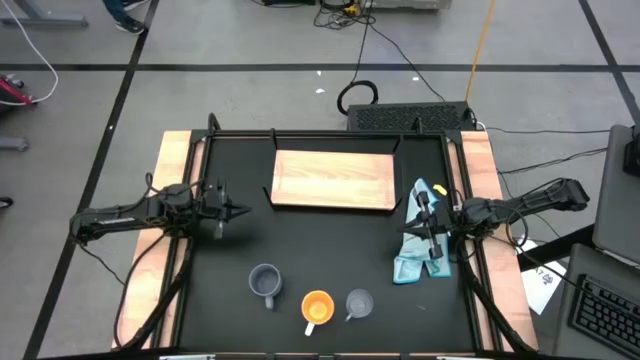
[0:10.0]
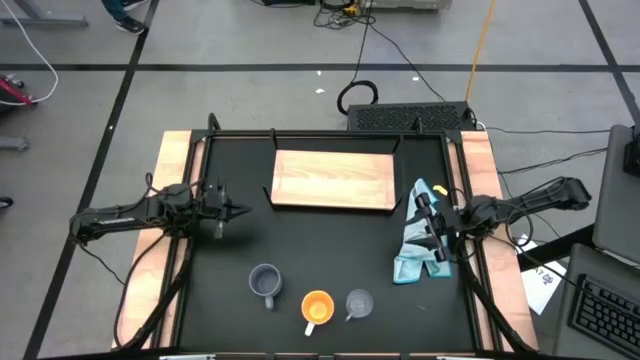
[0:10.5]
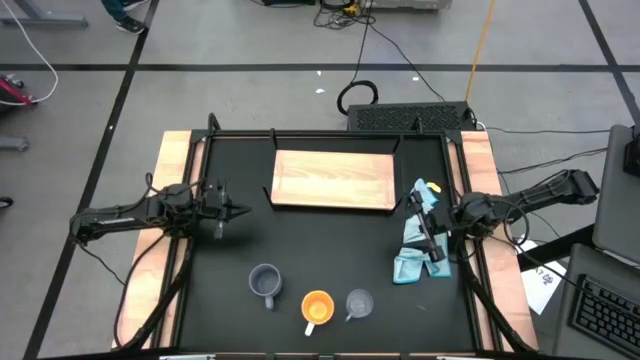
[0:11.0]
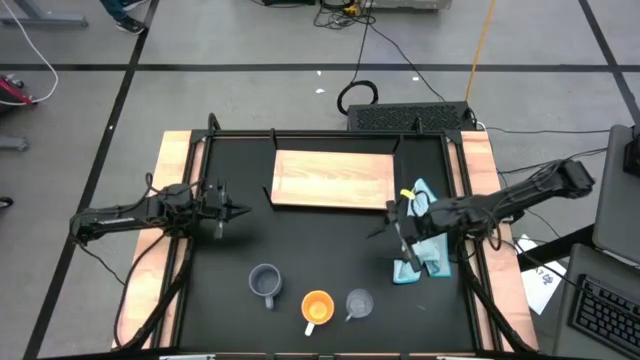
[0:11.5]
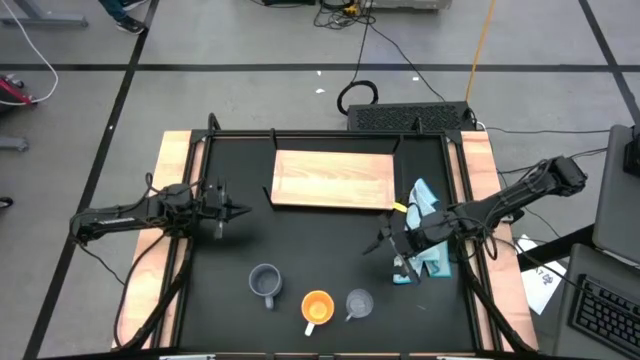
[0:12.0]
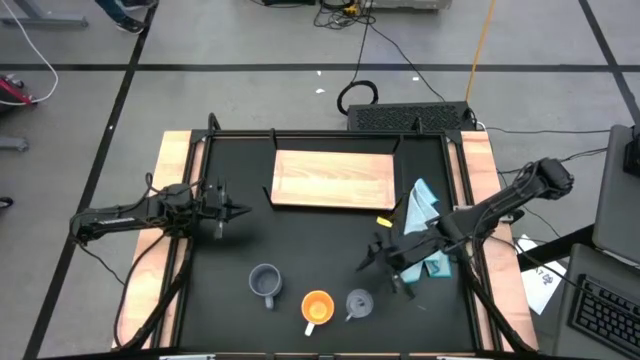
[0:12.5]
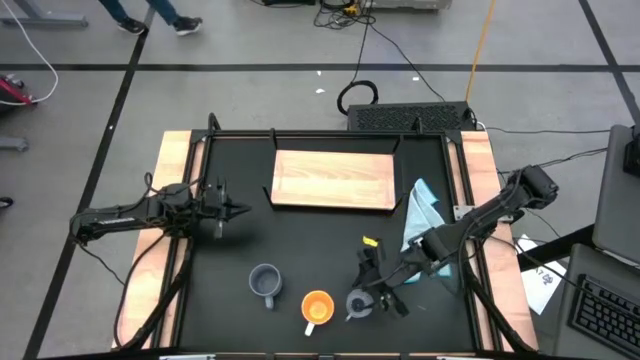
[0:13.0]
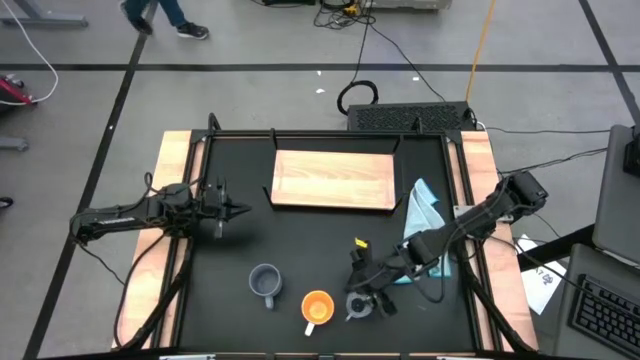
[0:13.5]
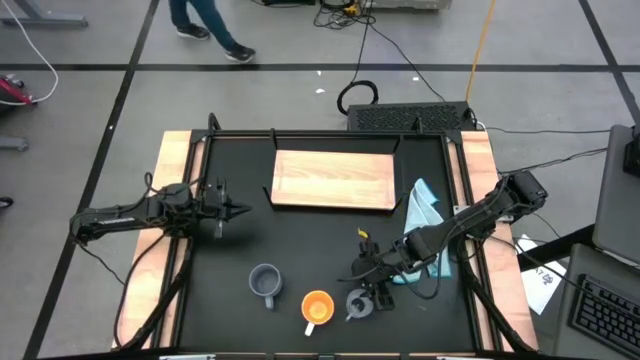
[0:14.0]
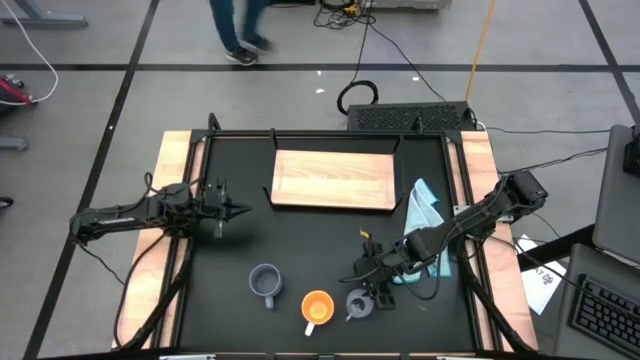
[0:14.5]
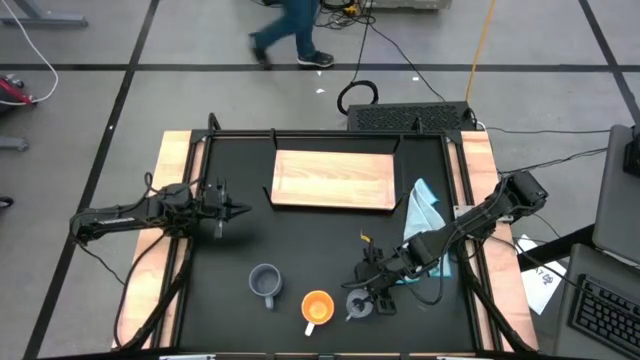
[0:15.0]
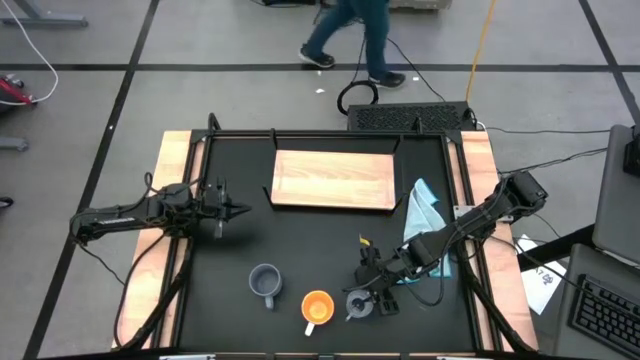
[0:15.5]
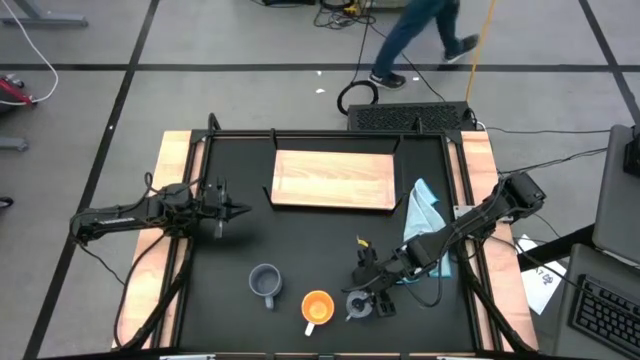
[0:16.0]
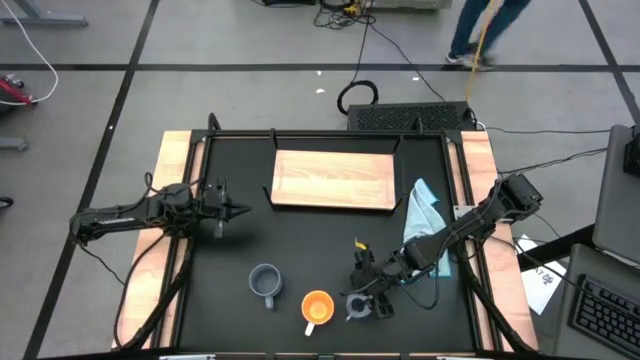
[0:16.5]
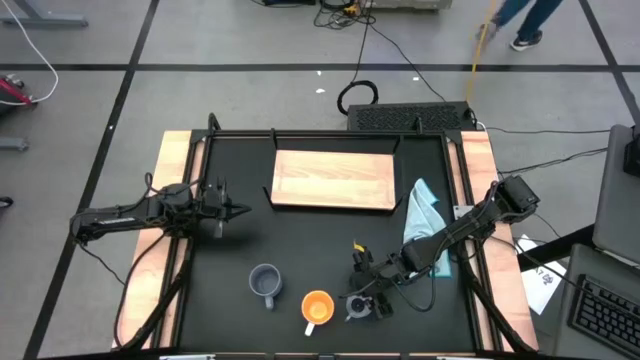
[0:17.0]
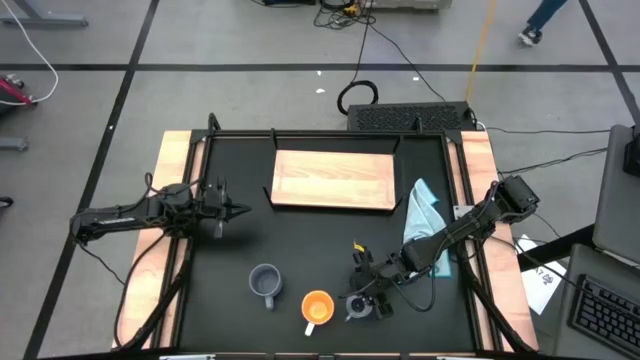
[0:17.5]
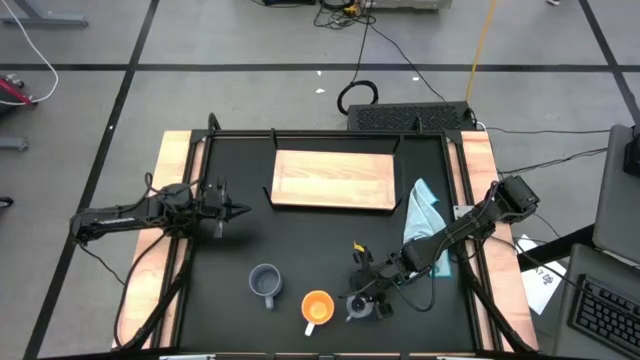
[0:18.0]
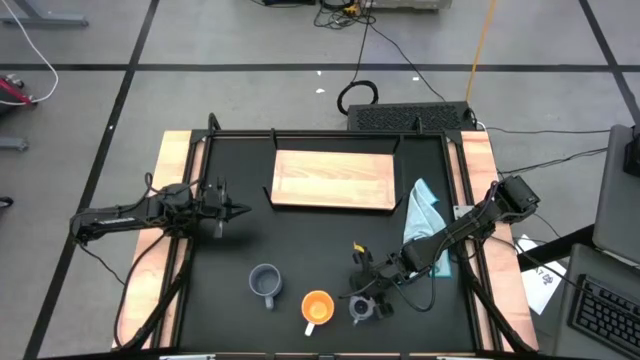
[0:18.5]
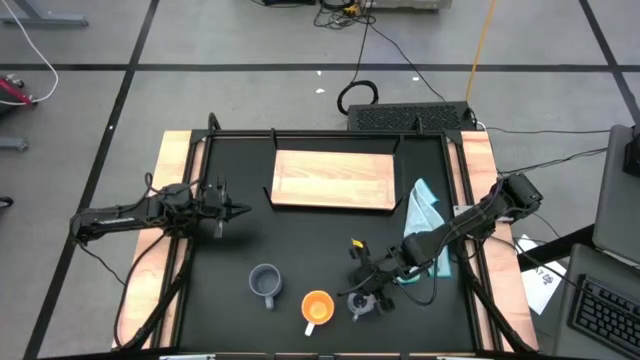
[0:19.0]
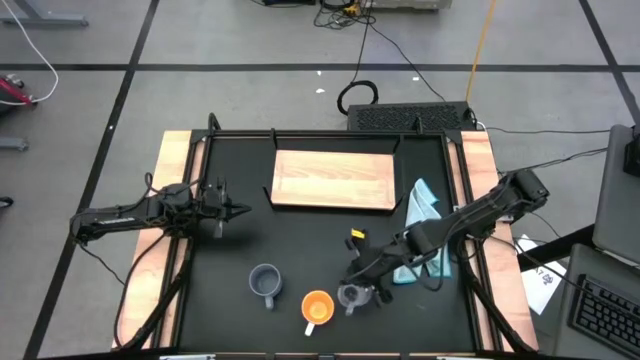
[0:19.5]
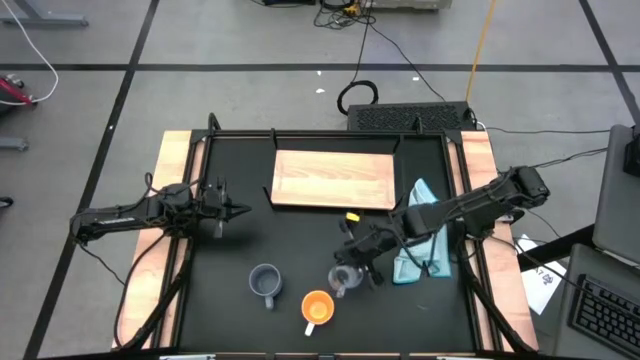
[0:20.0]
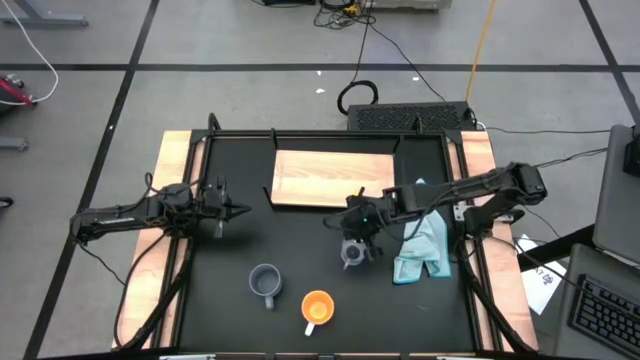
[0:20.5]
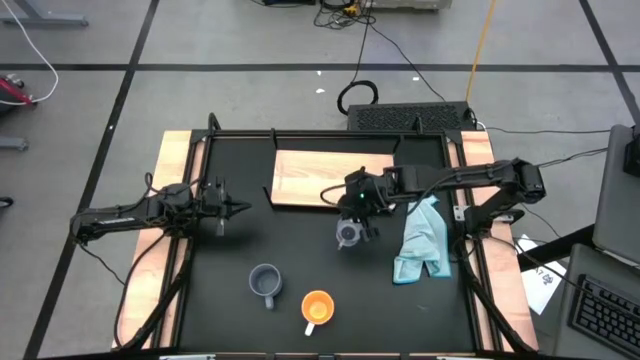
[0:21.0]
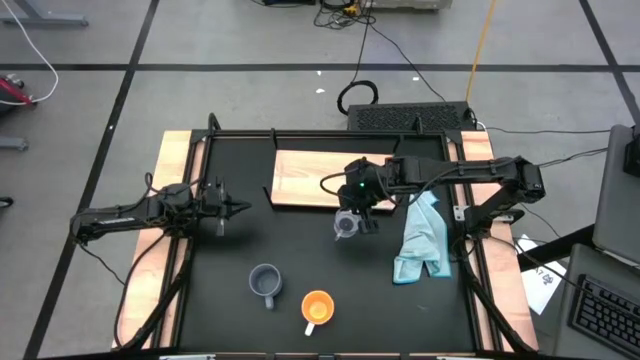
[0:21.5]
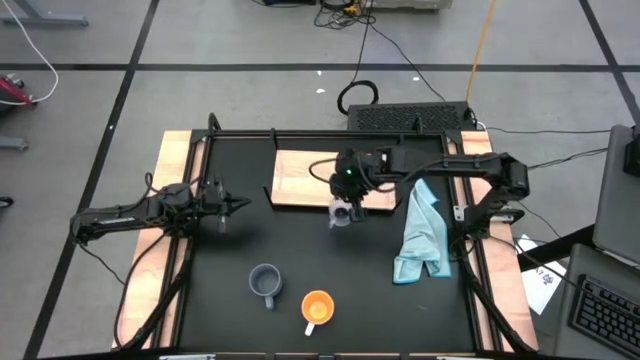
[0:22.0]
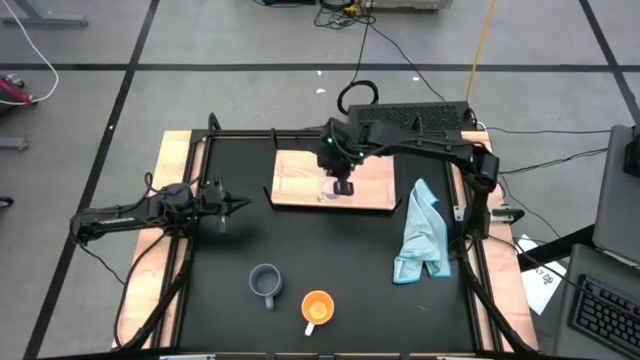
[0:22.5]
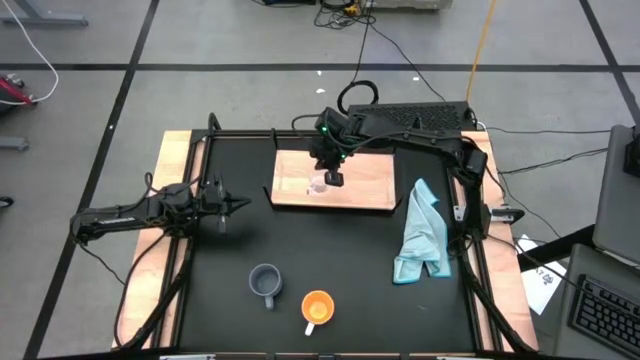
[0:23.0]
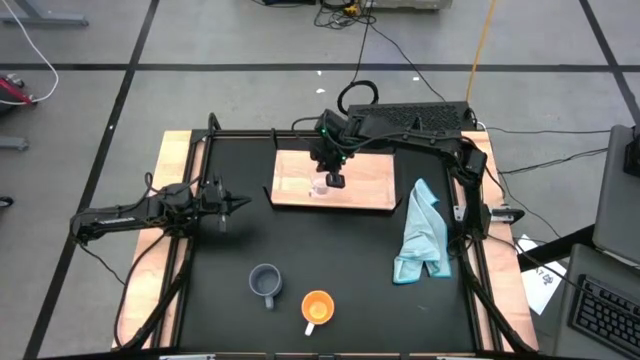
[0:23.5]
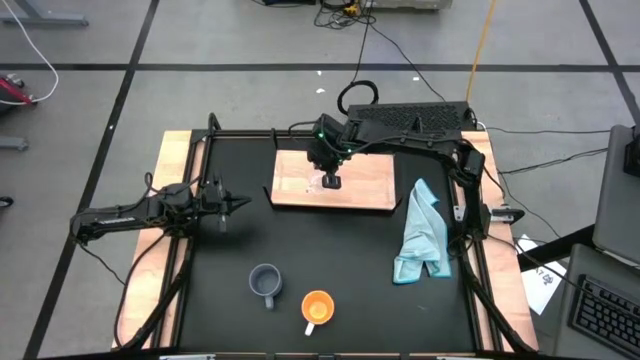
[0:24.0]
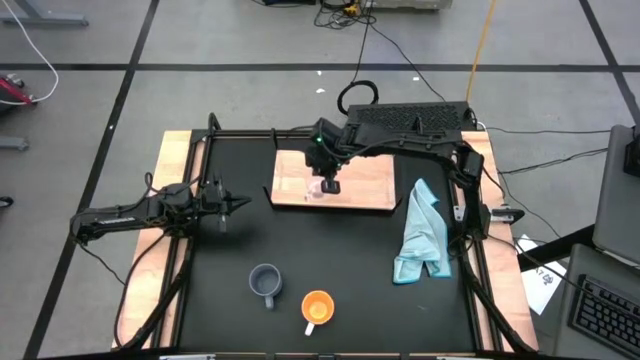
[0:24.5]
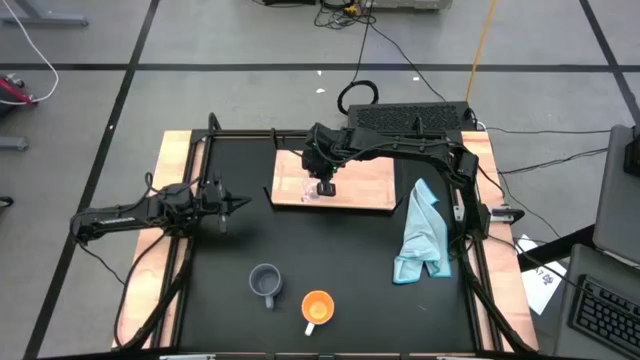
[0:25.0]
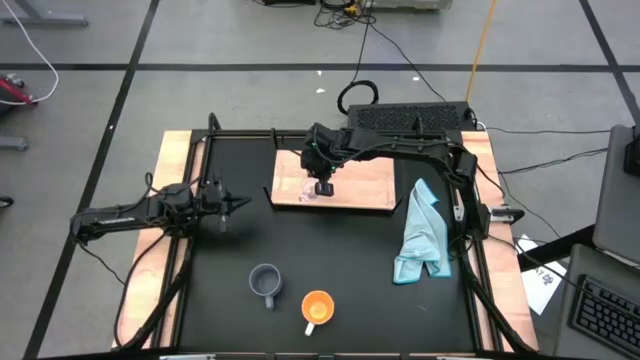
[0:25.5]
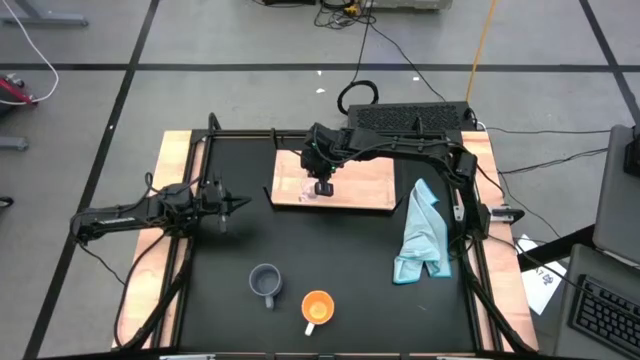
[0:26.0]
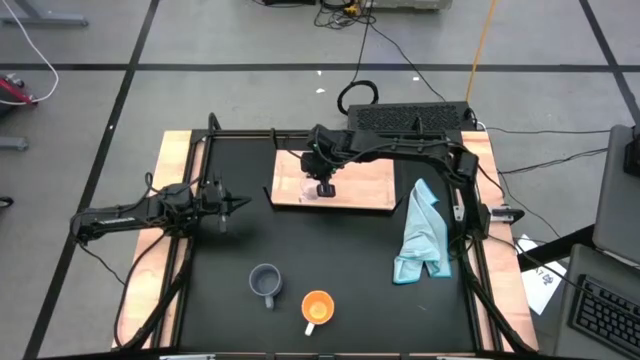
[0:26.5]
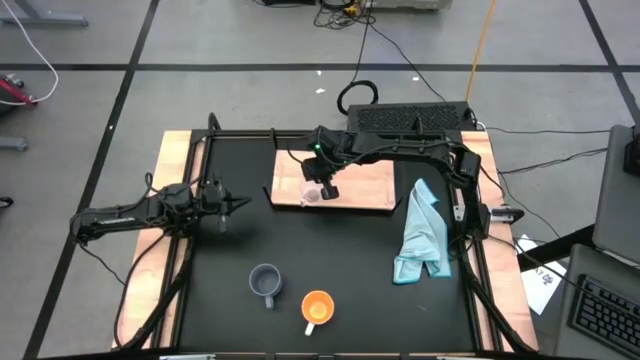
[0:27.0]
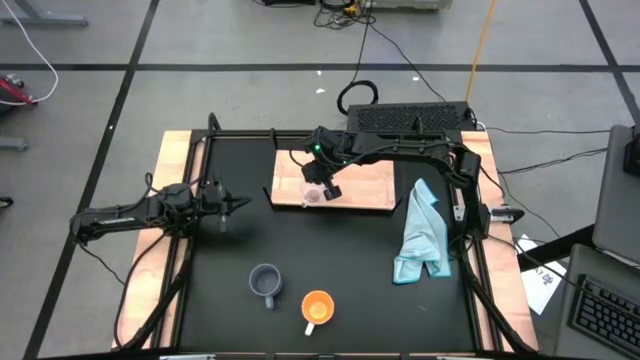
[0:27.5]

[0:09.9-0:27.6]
Task: Stack small to large cups/mugs on shelf
Put the transparent mug on the shelf

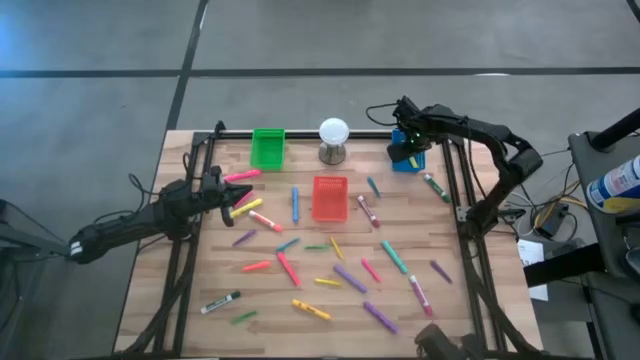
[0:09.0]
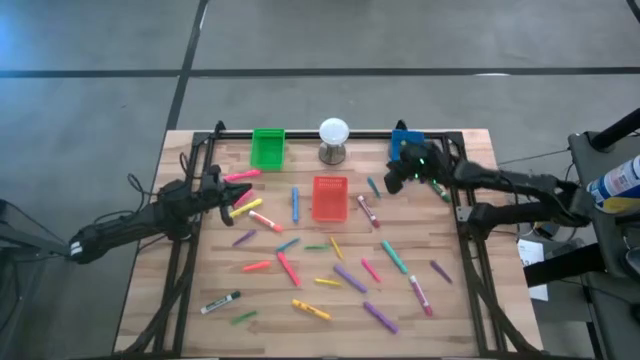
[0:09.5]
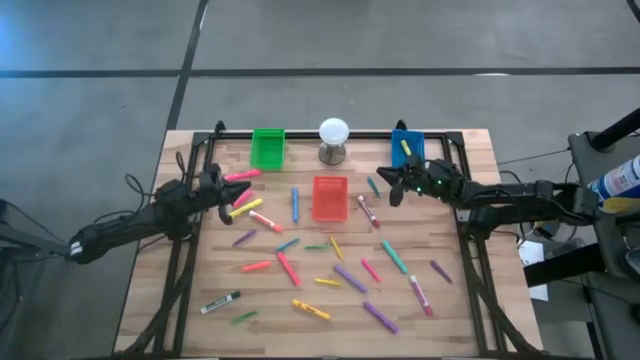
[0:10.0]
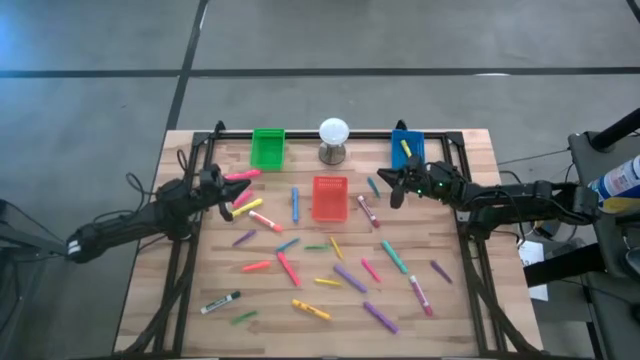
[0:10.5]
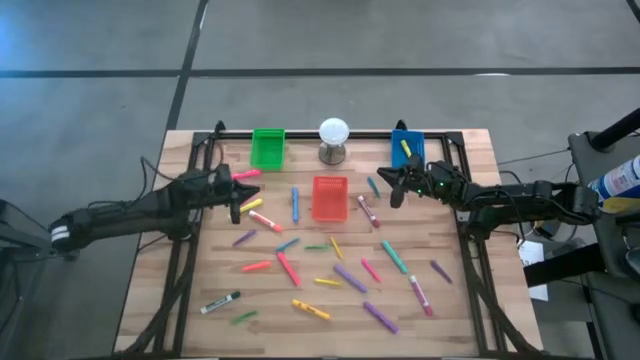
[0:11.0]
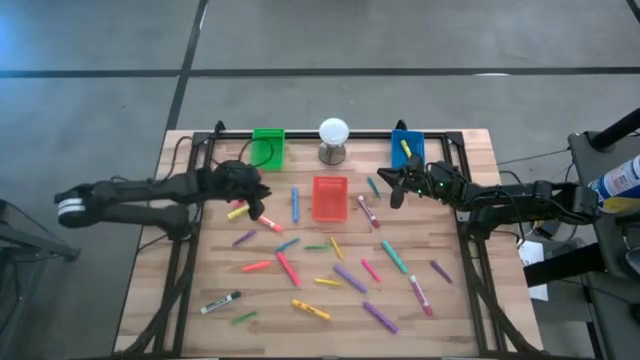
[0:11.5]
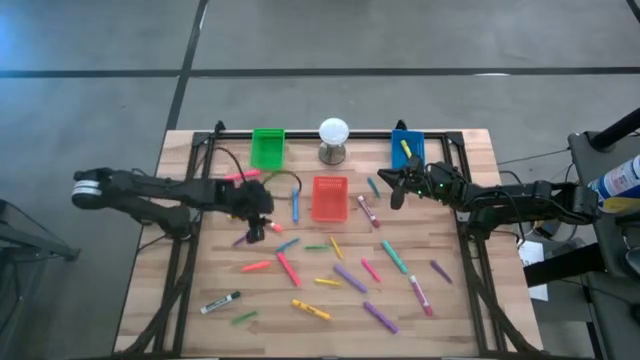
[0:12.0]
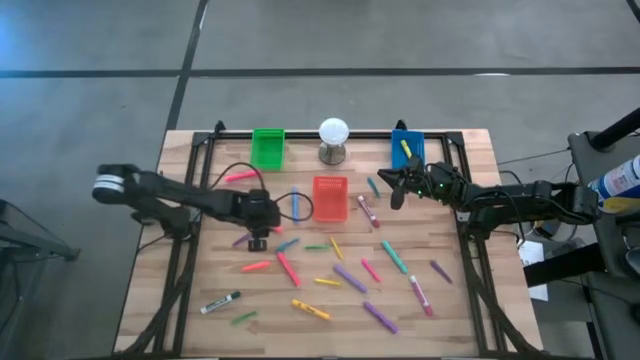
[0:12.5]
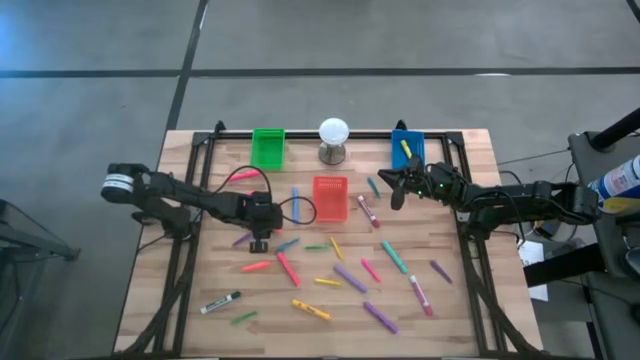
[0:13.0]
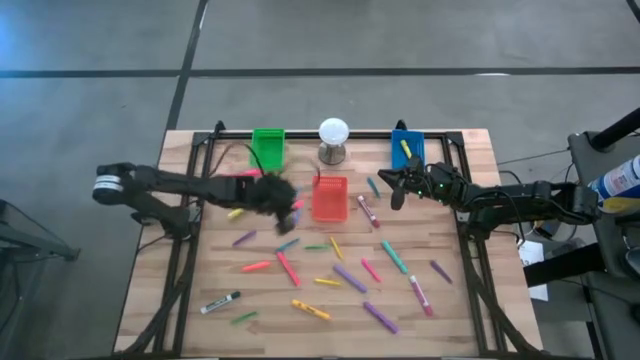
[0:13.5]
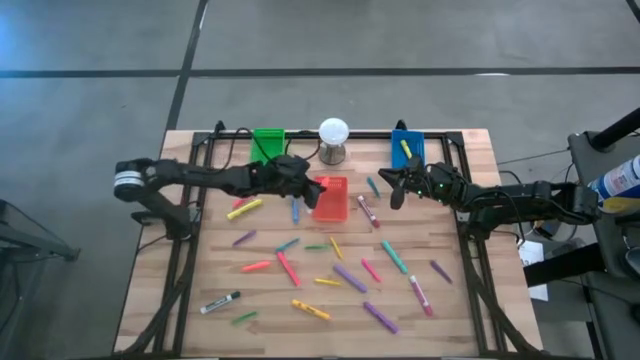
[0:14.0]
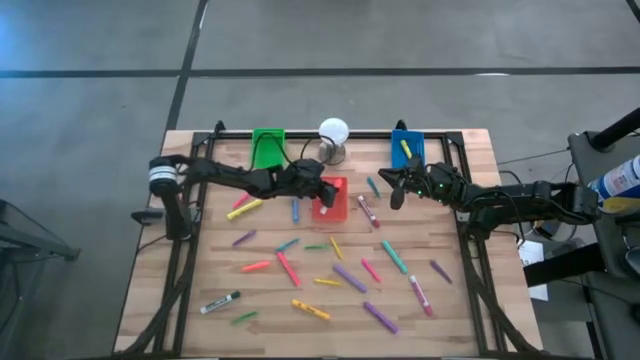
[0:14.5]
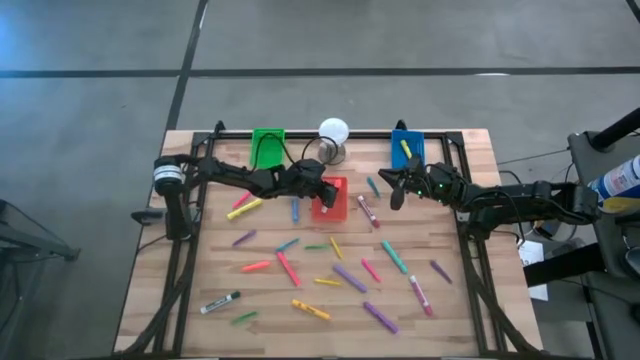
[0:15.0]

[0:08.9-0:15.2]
Task: Pick & Place Markers
Put the orange marker into the orange bin
